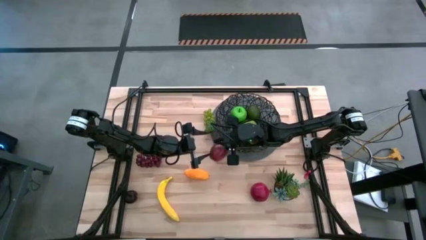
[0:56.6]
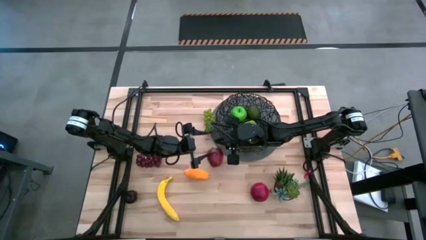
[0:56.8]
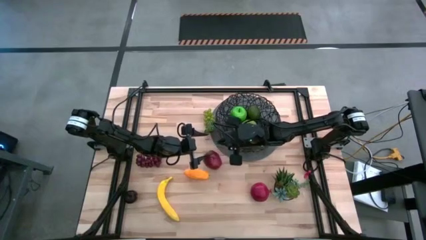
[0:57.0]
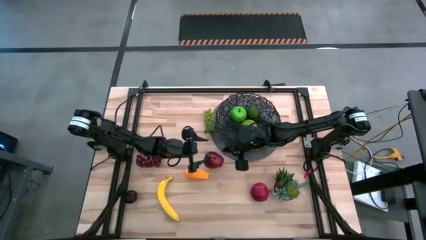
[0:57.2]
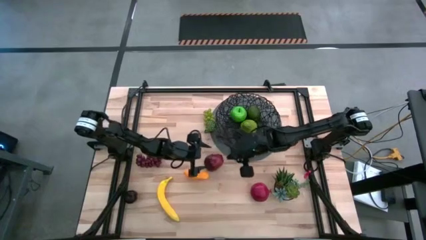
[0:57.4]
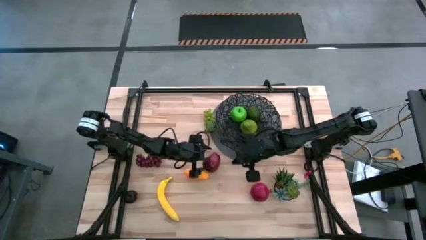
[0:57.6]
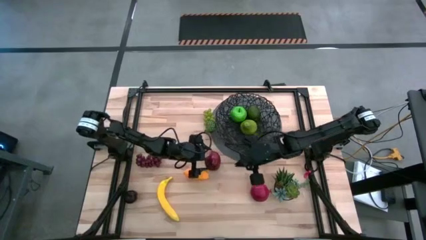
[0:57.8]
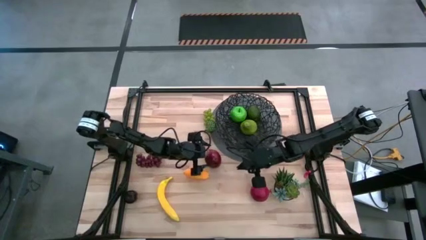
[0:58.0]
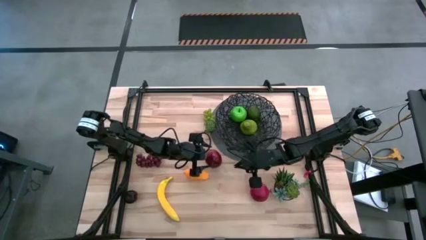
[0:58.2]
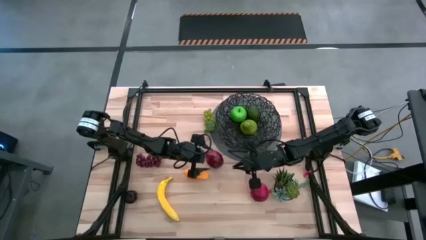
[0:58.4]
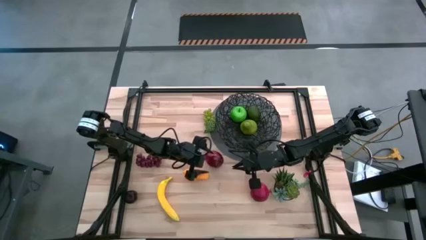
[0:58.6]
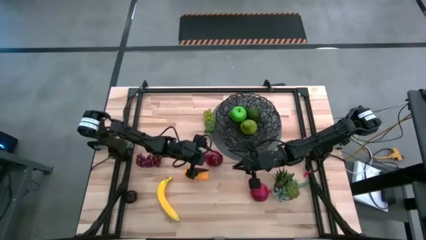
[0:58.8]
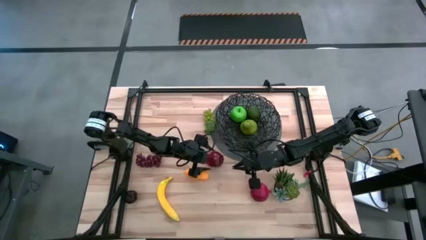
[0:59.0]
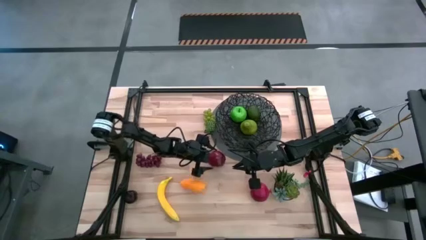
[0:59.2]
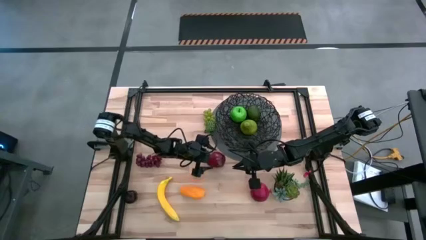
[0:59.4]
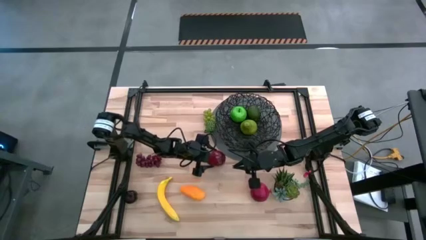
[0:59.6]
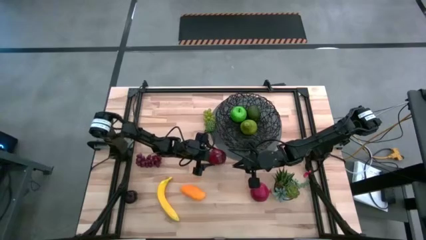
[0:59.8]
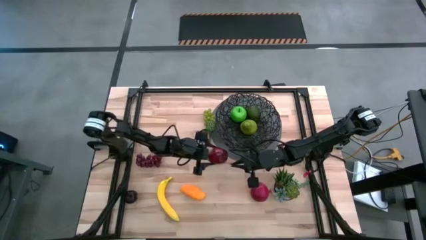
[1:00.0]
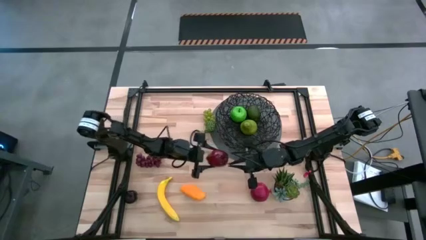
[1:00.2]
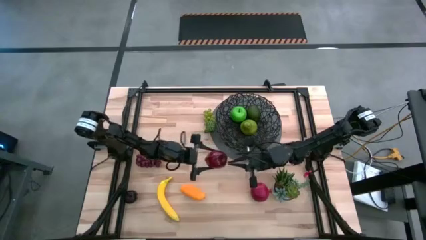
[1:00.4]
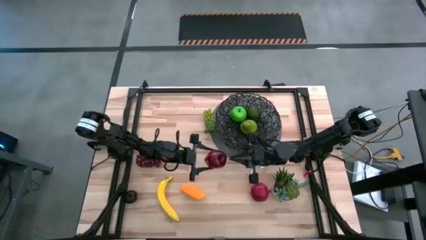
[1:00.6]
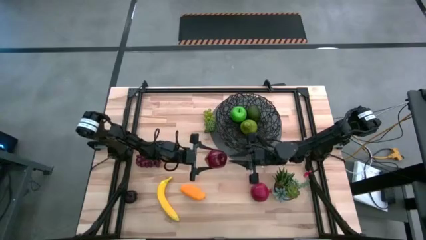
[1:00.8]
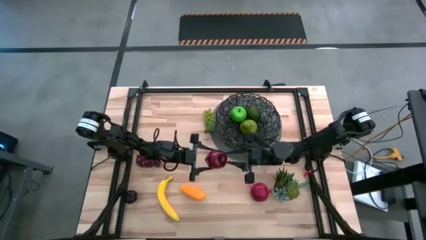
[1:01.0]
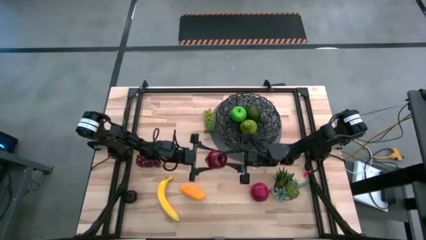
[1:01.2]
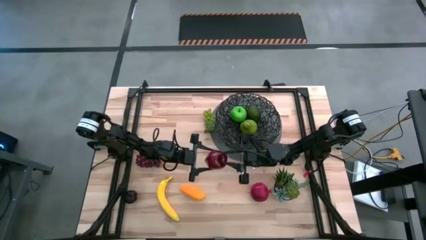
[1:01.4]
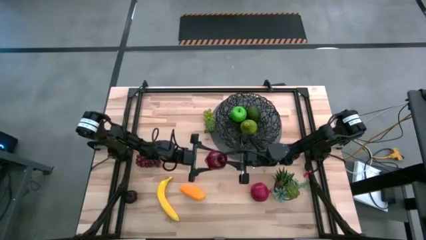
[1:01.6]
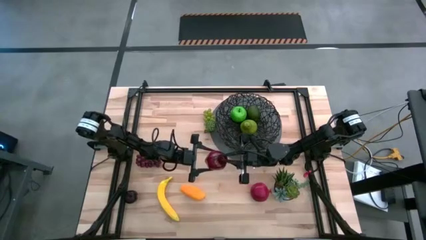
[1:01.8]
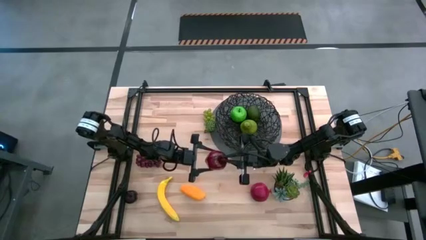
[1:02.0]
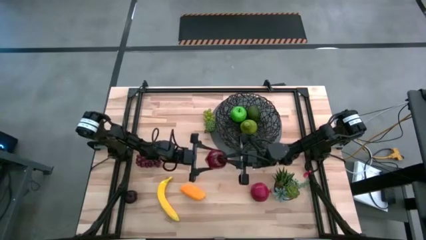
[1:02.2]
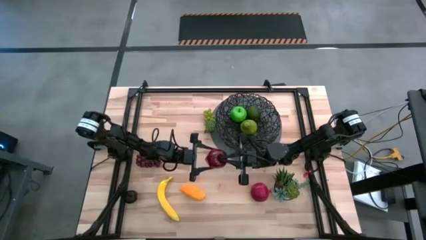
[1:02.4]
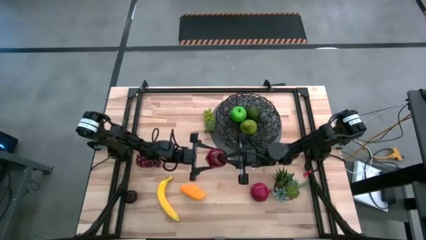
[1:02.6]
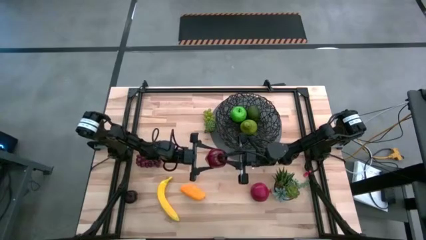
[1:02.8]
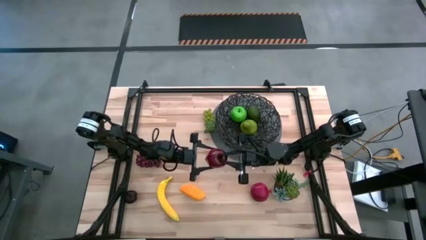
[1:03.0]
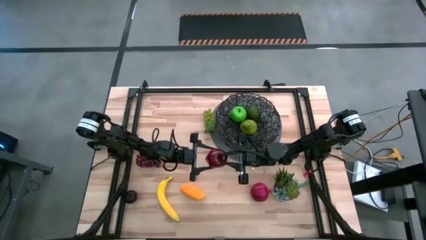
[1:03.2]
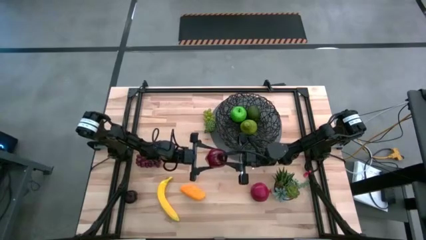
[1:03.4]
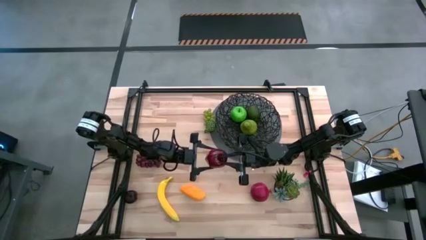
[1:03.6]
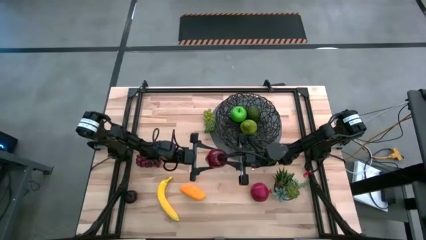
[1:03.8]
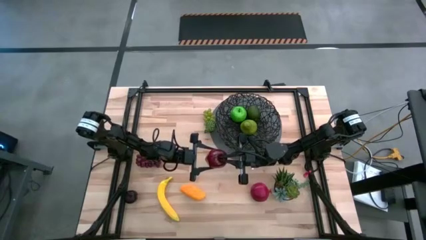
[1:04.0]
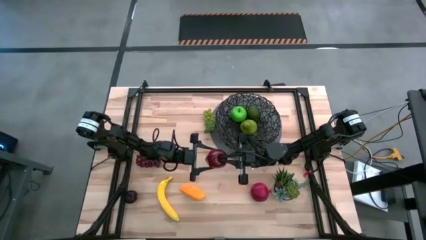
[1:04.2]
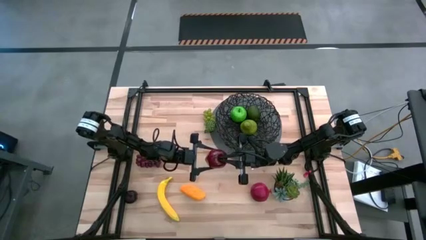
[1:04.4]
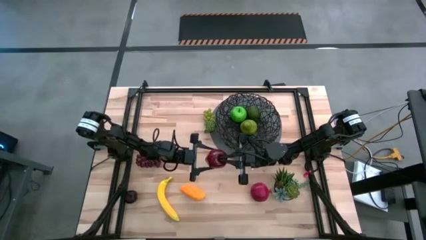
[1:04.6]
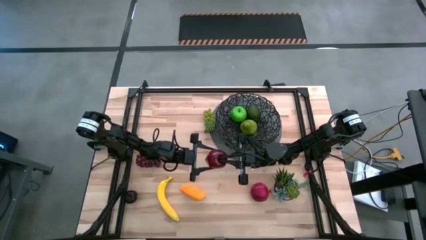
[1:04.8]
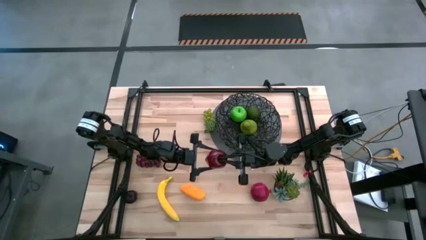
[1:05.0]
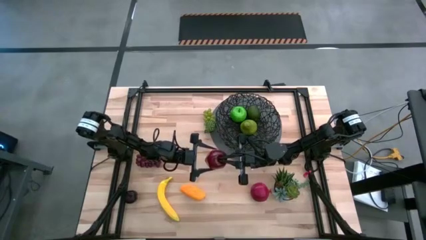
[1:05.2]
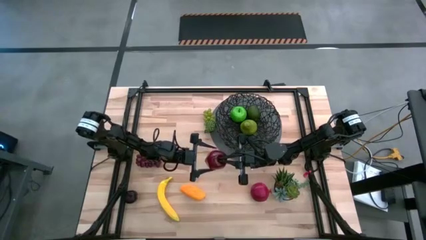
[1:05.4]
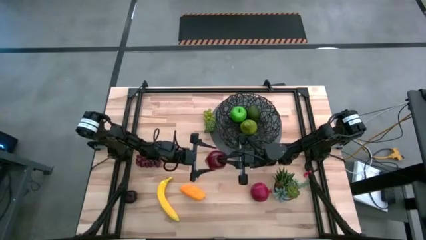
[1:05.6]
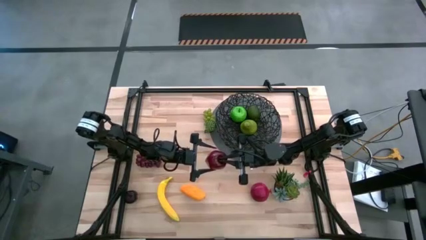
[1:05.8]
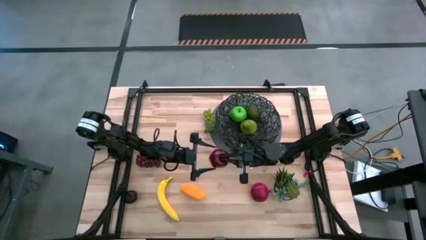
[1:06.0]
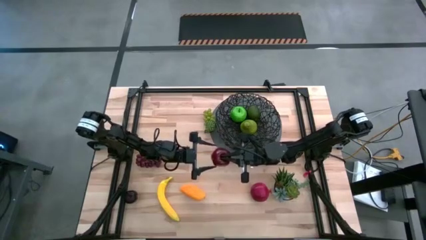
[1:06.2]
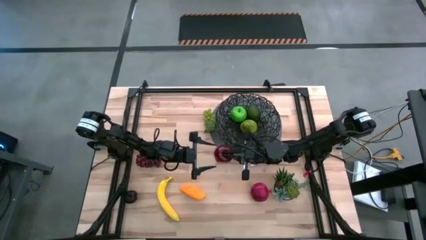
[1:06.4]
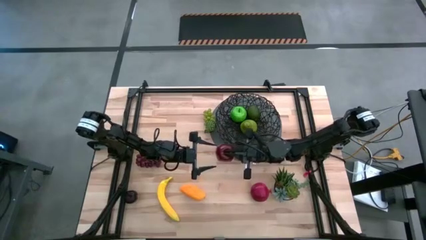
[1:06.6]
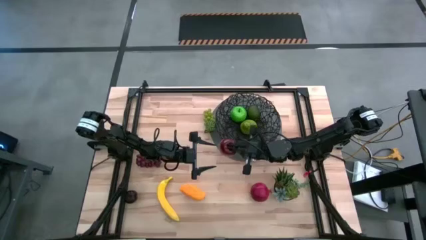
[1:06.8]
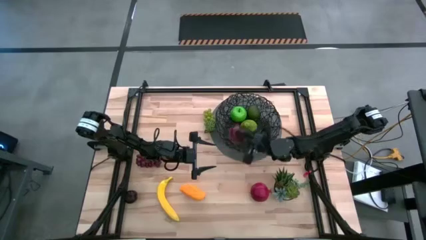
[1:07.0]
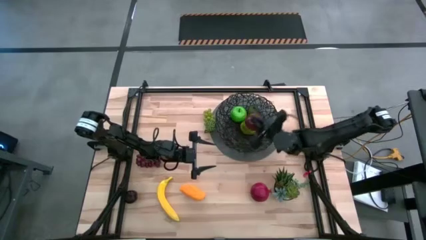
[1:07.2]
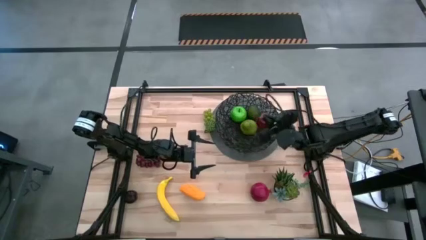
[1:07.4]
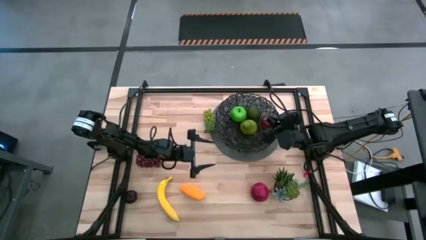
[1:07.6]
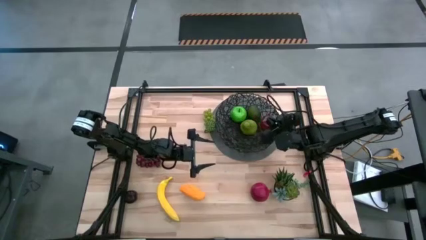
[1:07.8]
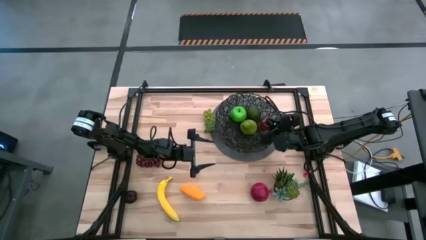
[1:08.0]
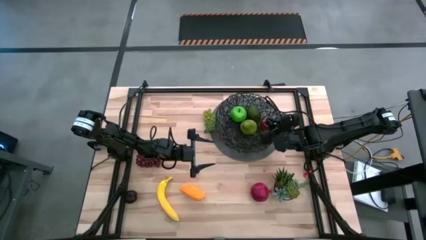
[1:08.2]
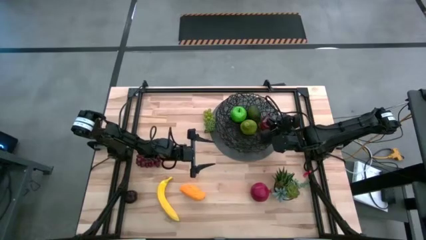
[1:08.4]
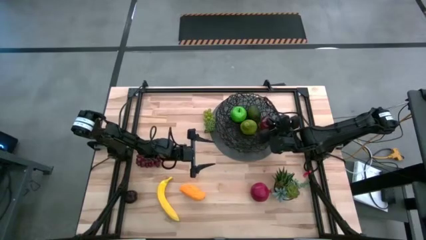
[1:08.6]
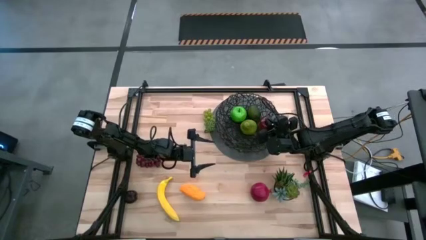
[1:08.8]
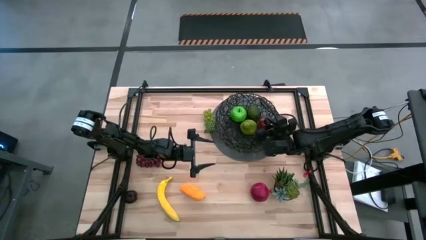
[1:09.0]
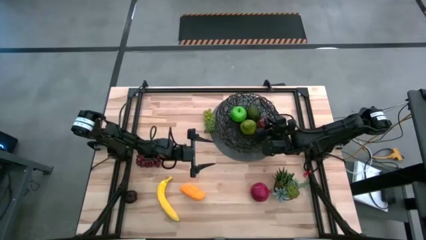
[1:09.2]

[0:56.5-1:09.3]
Task: Build produce basket
Put the red apple into the wire basket
